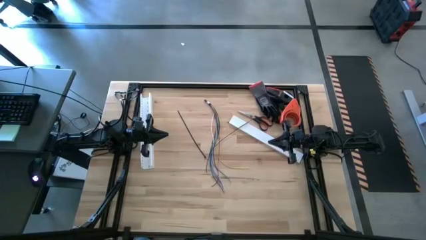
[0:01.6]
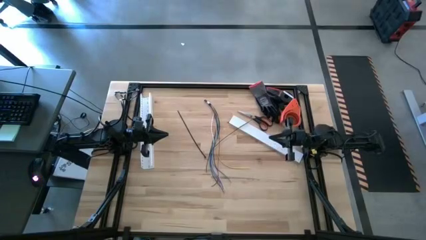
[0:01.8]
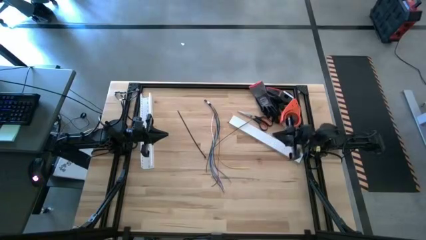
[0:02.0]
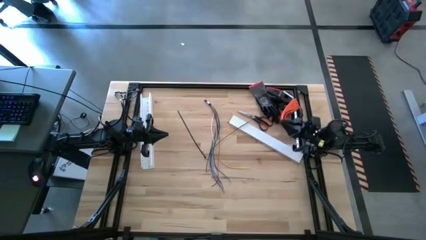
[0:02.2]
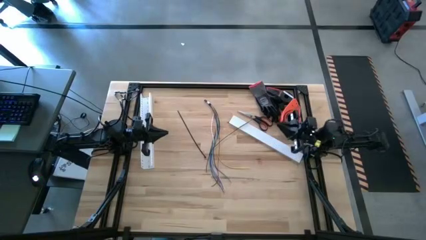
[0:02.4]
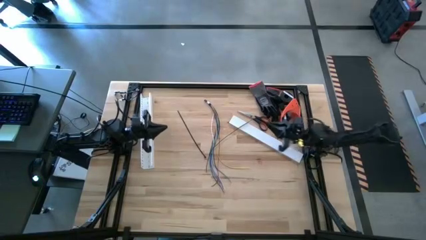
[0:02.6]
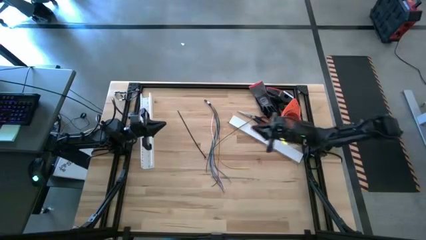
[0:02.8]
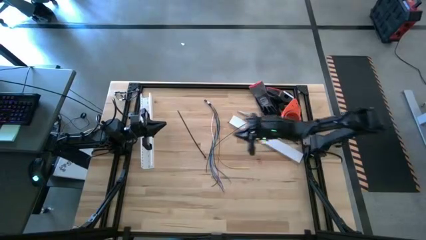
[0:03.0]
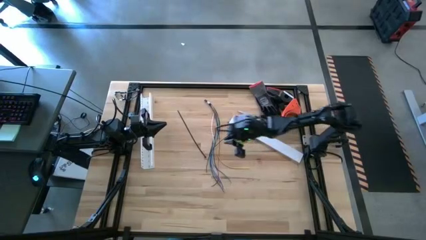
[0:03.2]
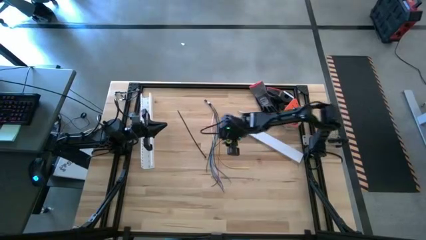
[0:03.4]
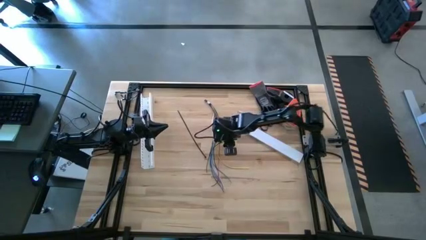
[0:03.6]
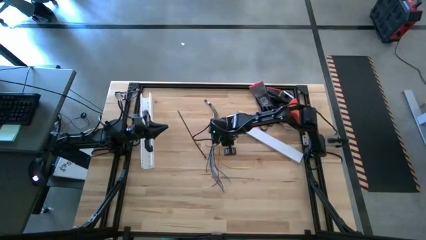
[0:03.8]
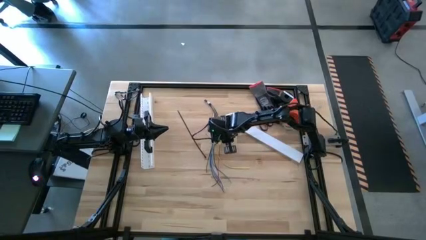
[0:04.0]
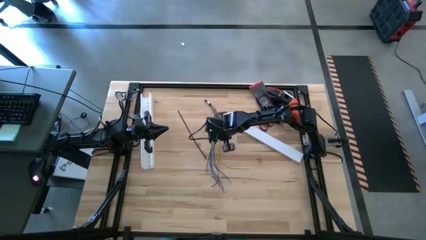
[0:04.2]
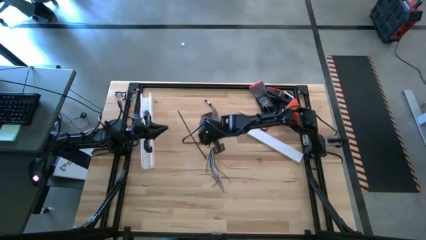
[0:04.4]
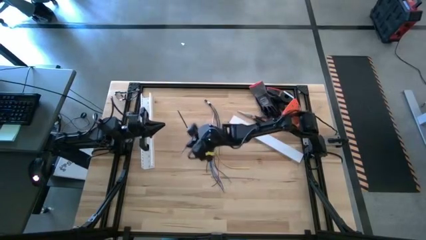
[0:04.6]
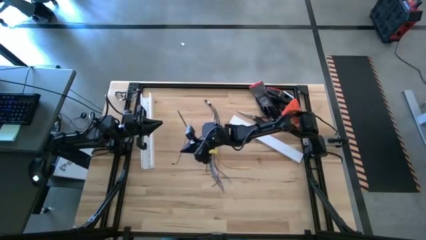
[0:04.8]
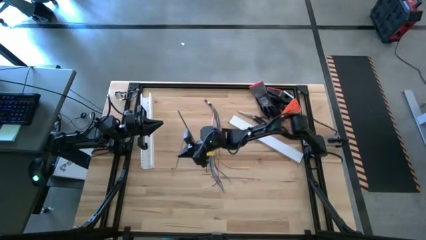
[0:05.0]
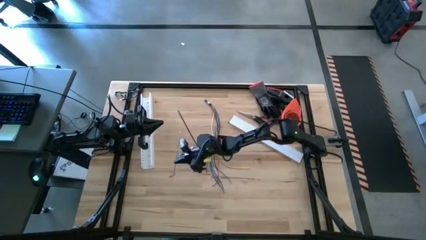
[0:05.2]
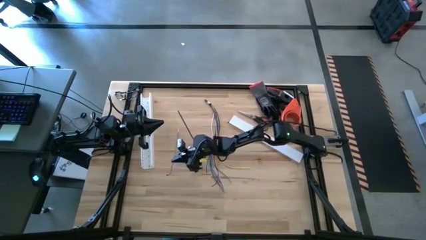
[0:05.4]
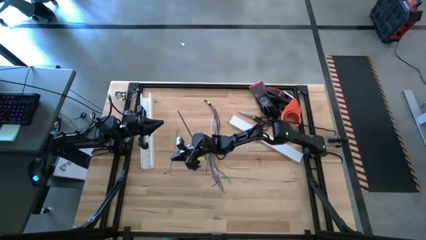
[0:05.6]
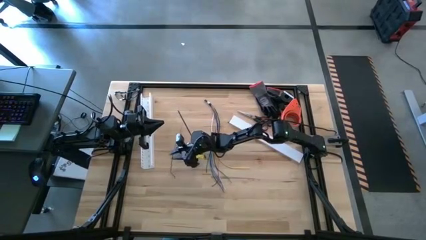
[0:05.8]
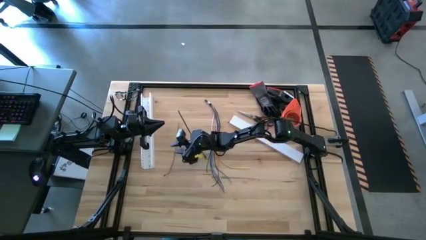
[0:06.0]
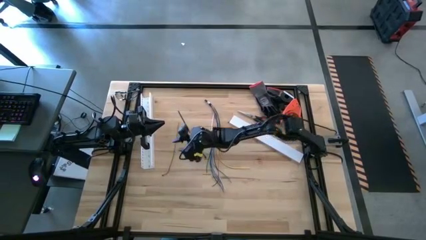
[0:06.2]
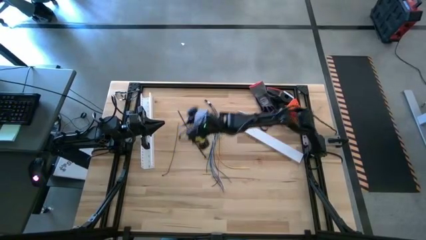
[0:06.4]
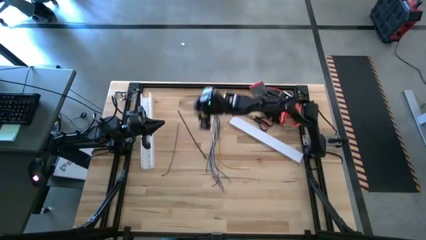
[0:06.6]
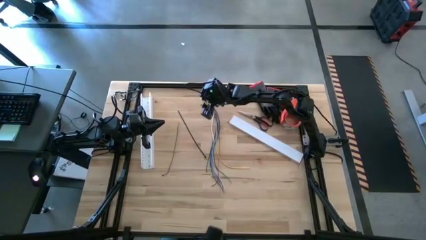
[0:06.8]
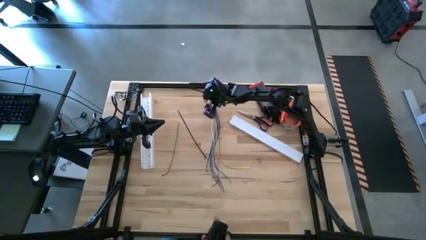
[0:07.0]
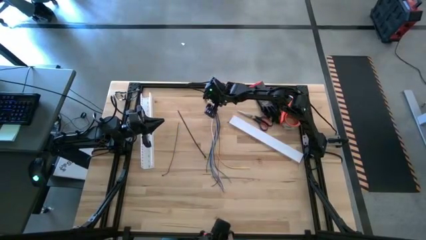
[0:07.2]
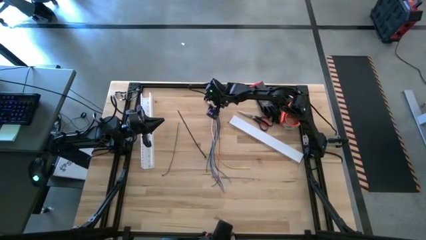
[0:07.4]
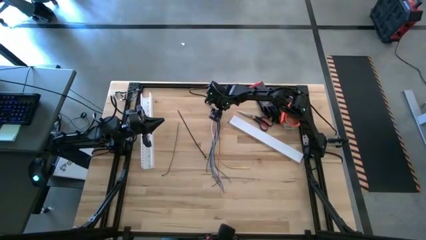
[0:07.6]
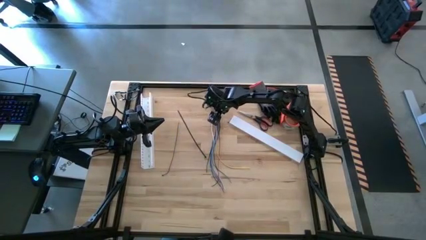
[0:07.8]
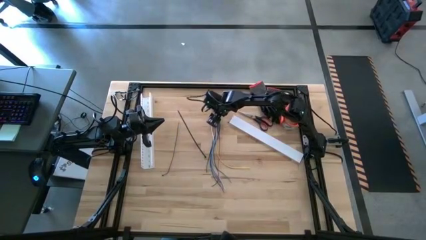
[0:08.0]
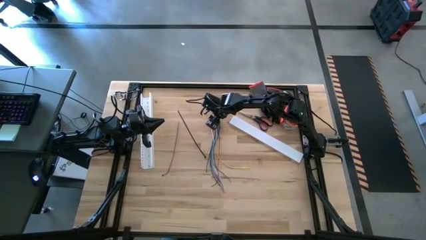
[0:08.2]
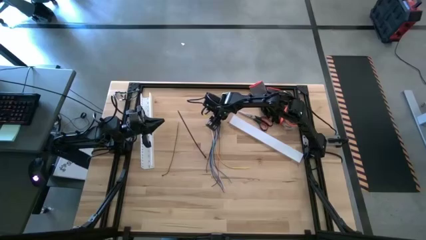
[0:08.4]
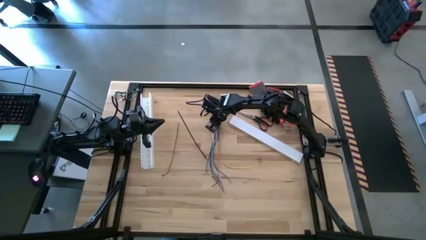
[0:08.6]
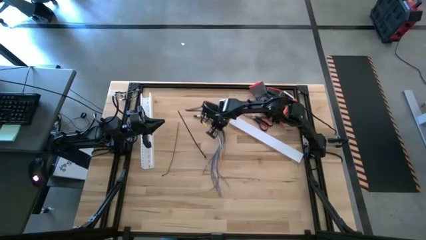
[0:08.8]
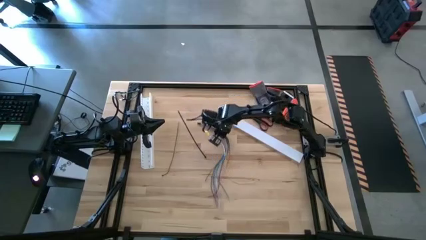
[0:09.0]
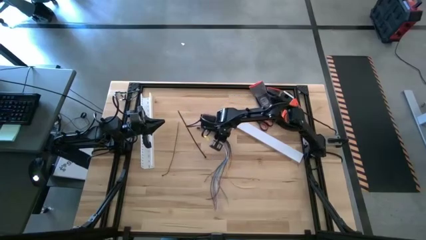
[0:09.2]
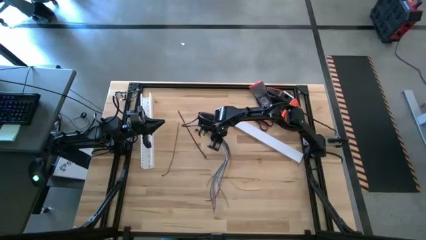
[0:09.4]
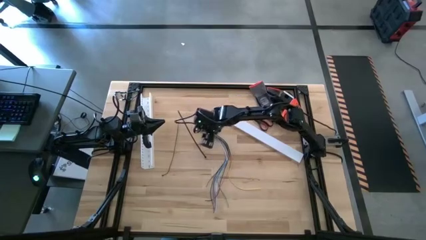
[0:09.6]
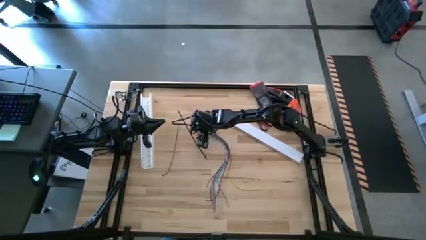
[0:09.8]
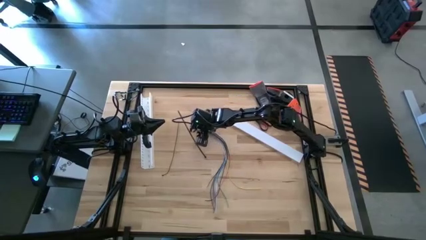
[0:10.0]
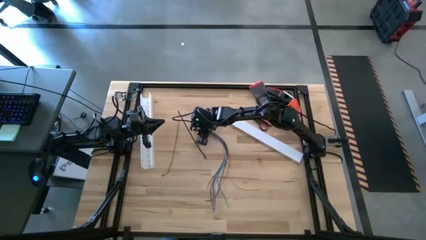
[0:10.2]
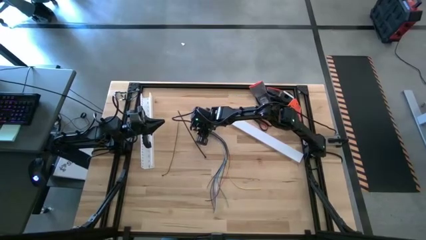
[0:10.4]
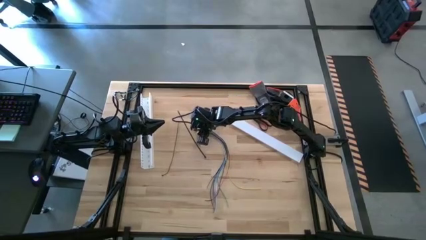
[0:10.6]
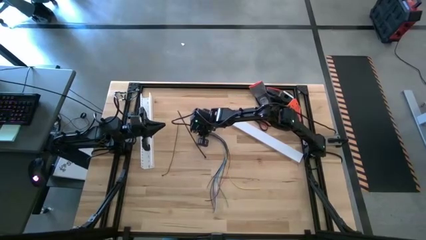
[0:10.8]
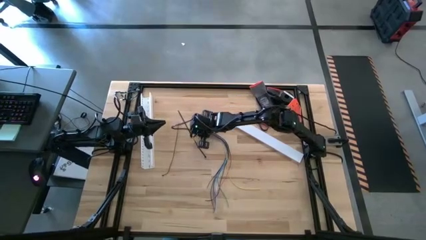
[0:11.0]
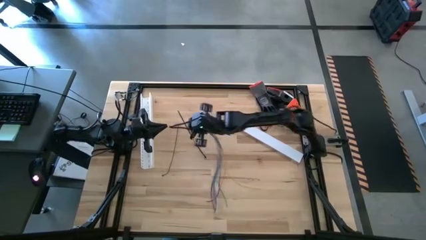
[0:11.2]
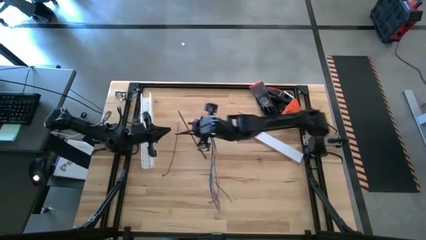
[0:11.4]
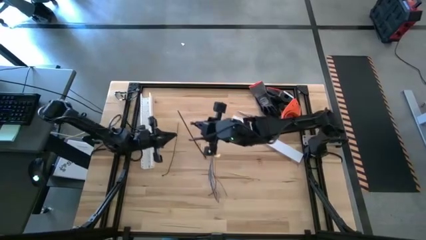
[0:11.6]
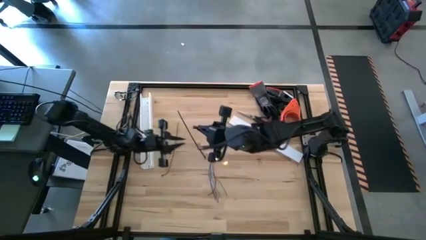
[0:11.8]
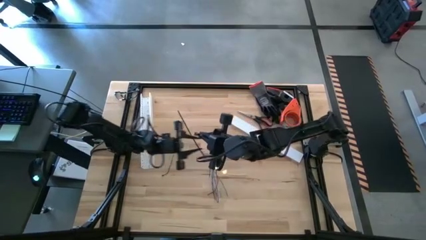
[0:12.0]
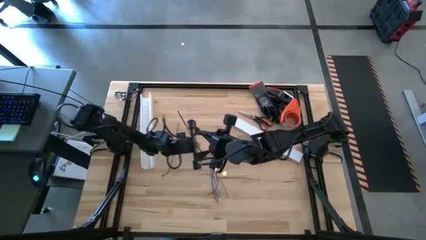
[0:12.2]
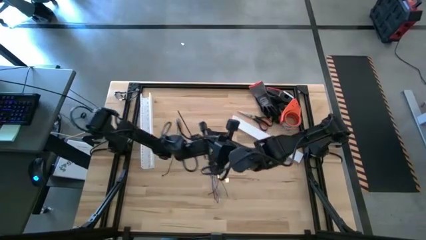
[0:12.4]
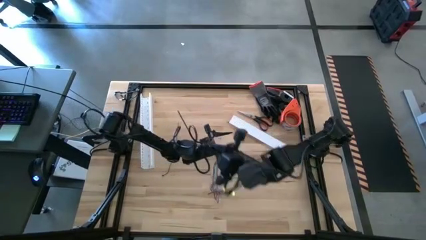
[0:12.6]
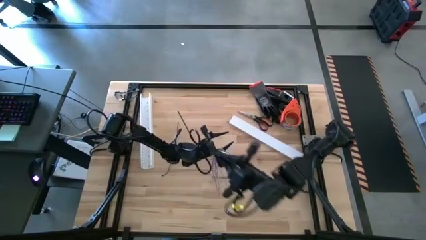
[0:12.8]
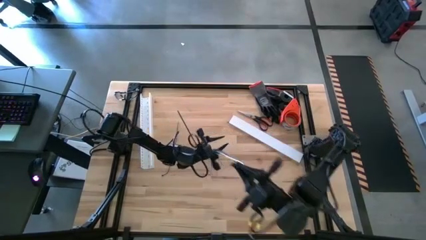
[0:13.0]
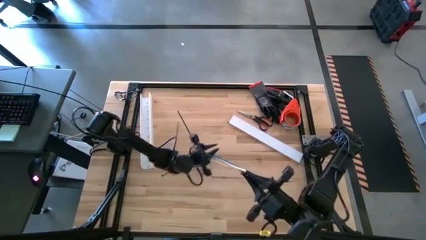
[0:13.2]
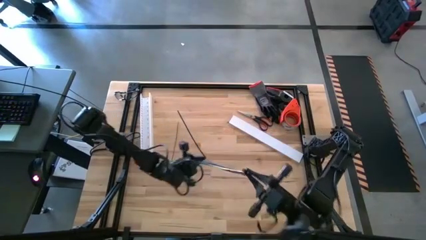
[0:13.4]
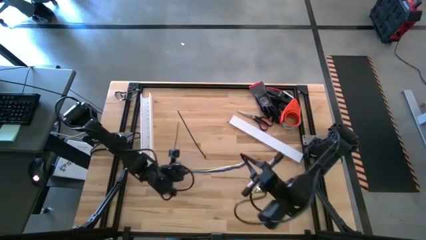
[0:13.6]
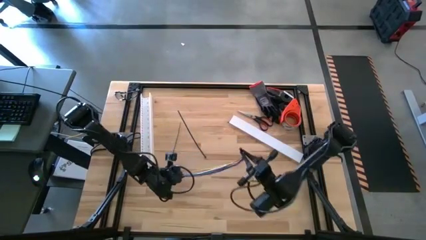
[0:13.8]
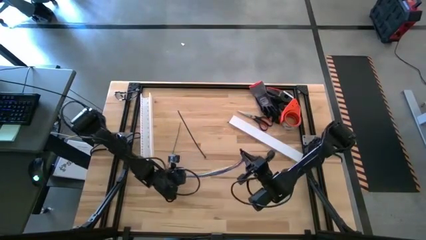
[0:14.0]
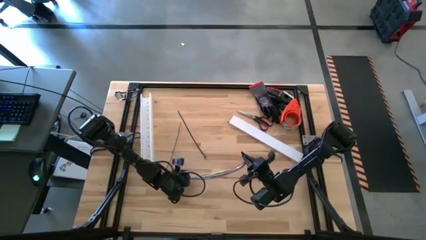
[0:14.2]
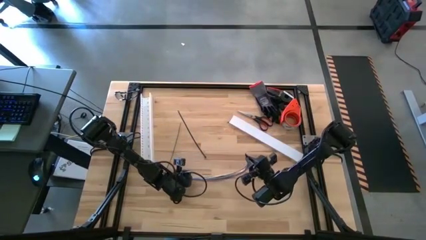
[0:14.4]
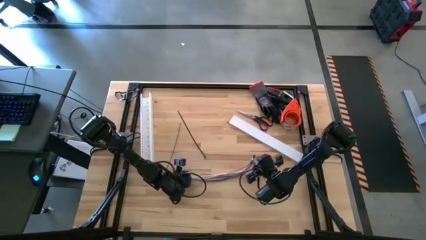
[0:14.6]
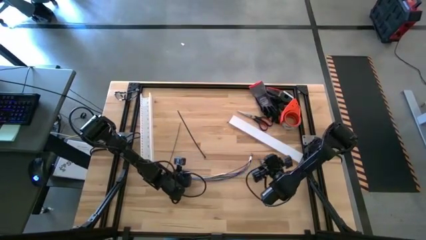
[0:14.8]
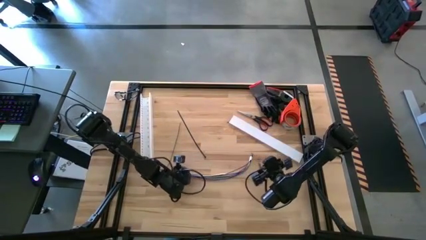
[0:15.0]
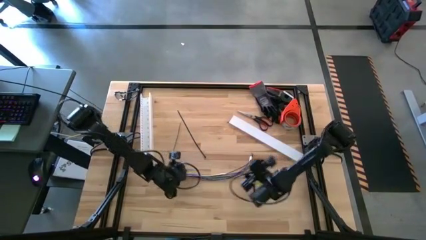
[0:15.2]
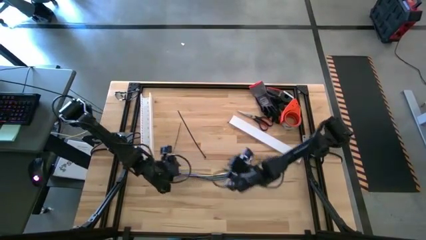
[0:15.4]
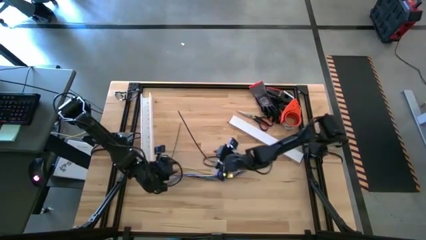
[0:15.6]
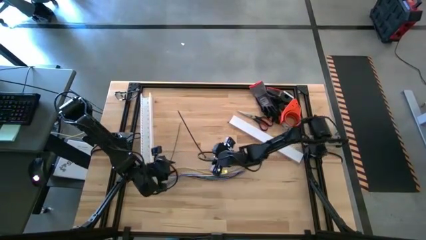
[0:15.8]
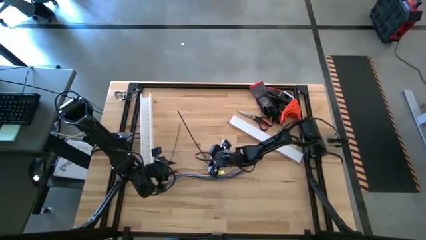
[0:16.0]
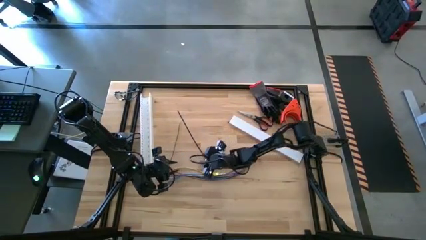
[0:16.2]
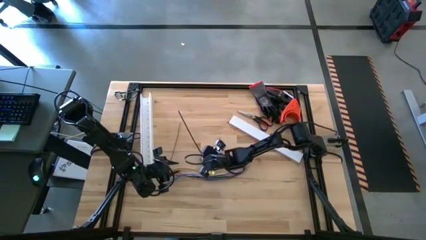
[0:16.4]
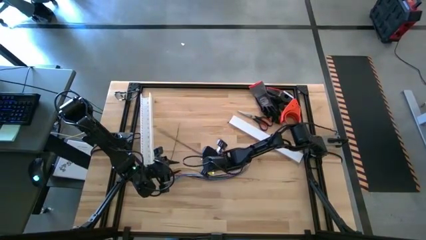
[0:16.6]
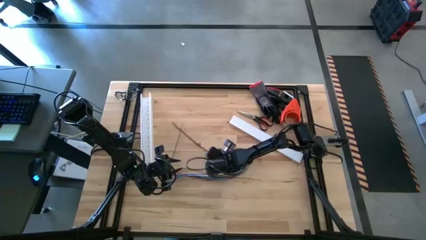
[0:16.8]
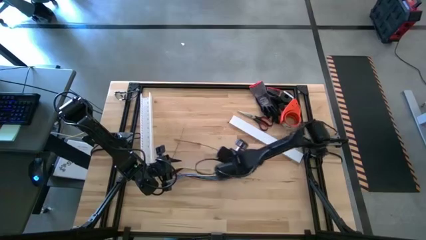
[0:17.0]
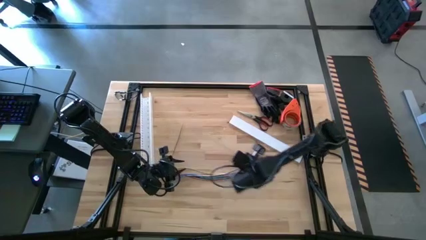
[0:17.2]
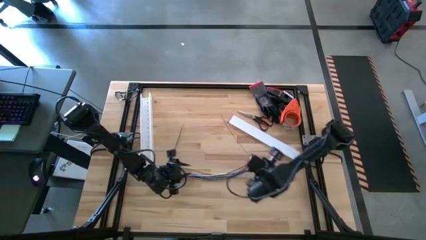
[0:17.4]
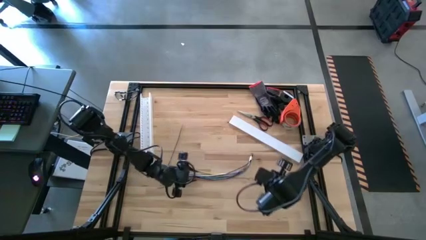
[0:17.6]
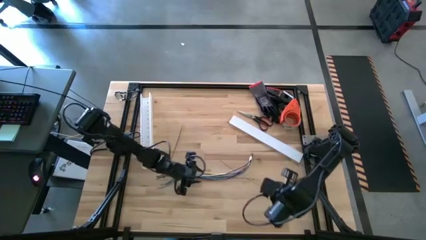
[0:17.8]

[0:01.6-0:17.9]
Task: Ziptie cables
Wrap the zip tie on the cable
